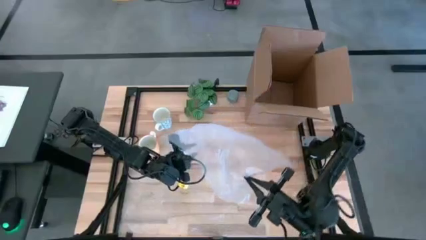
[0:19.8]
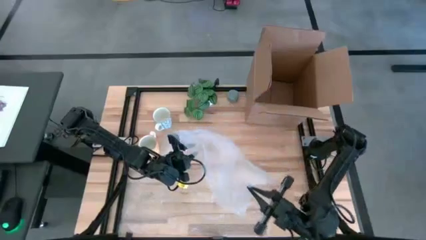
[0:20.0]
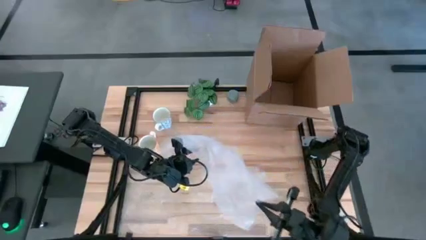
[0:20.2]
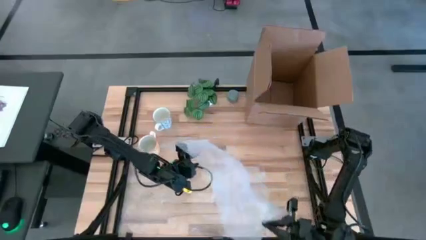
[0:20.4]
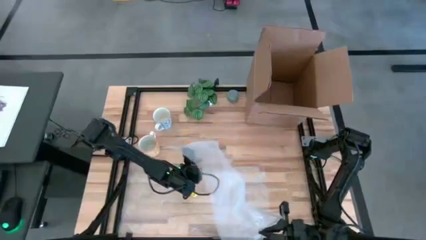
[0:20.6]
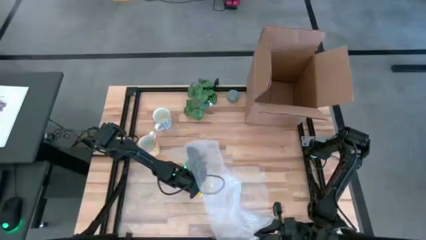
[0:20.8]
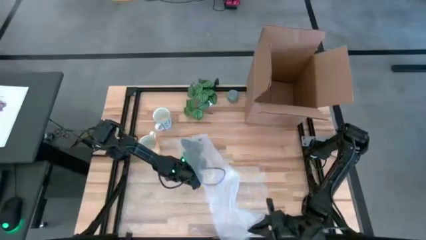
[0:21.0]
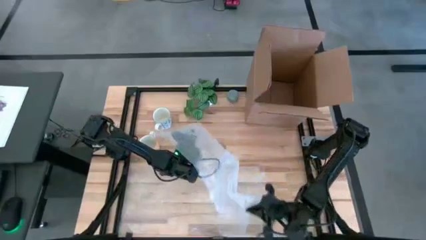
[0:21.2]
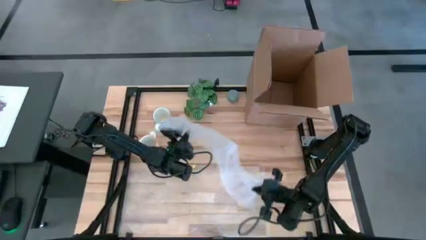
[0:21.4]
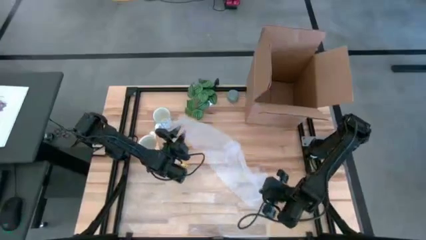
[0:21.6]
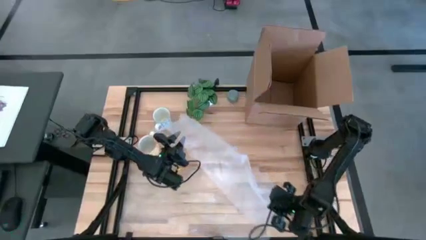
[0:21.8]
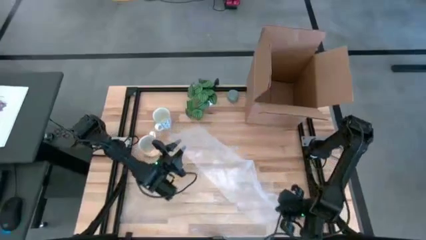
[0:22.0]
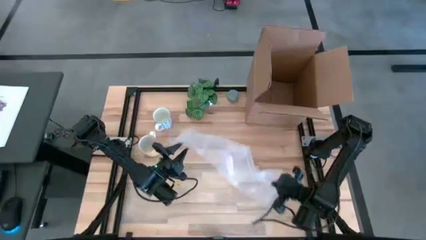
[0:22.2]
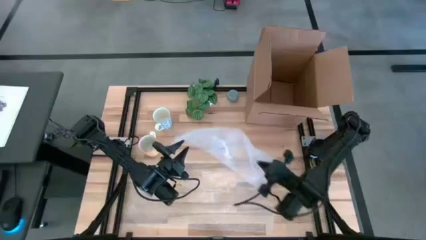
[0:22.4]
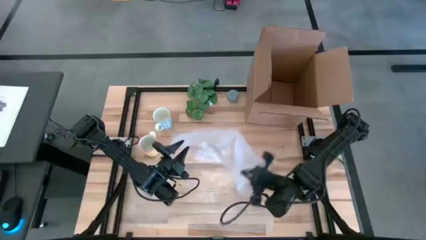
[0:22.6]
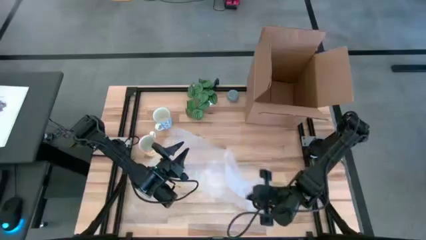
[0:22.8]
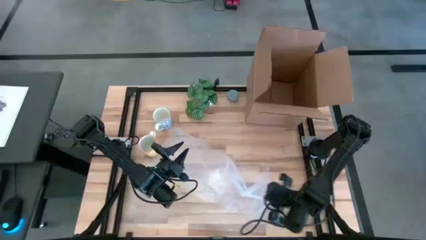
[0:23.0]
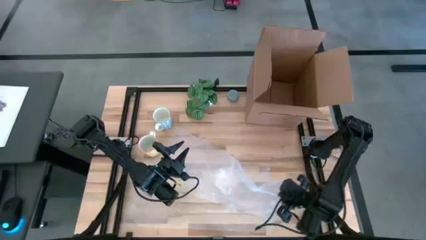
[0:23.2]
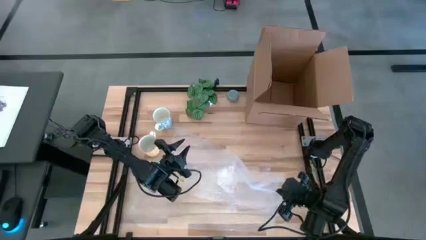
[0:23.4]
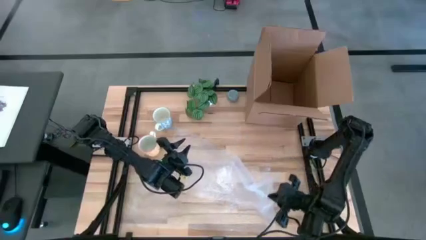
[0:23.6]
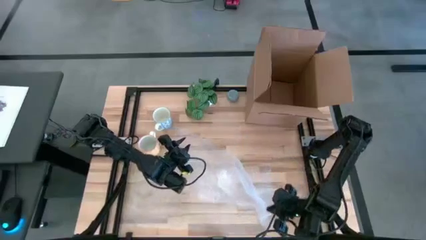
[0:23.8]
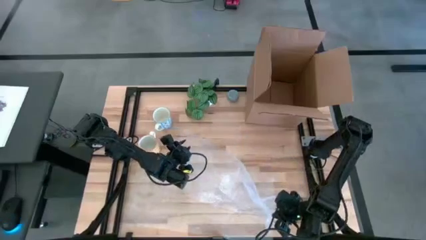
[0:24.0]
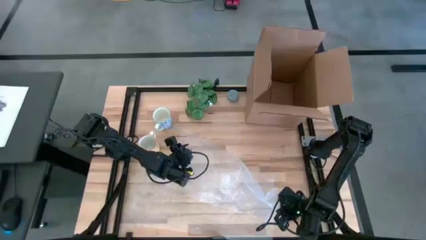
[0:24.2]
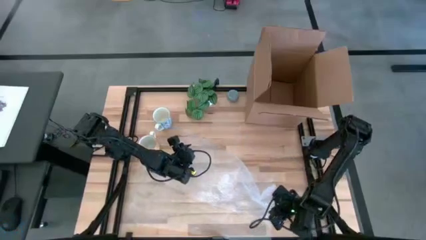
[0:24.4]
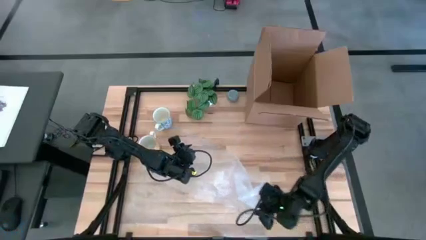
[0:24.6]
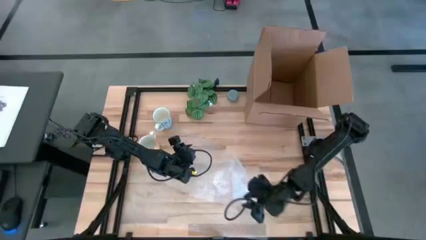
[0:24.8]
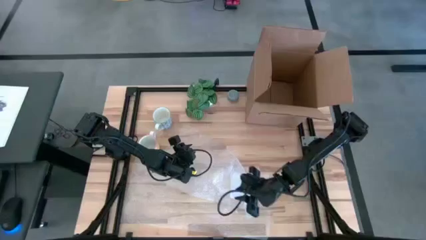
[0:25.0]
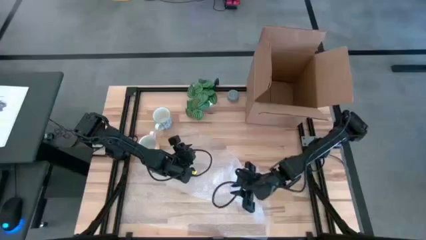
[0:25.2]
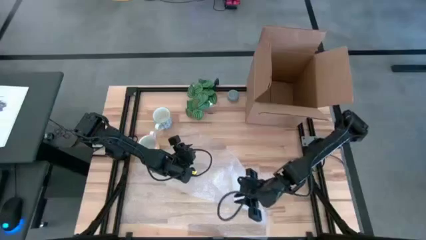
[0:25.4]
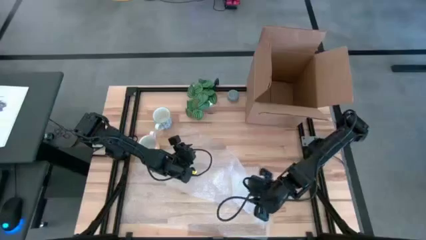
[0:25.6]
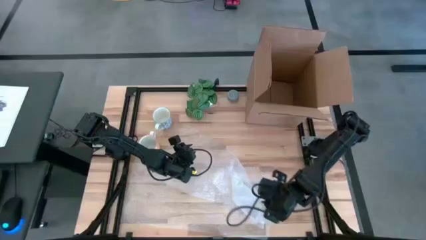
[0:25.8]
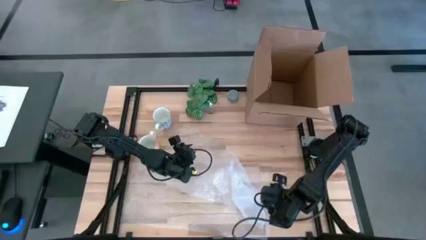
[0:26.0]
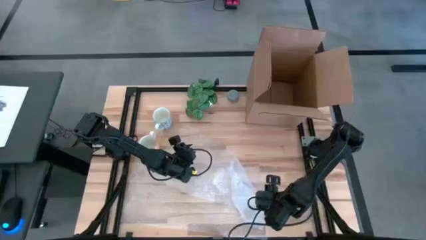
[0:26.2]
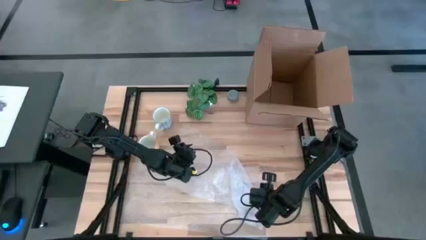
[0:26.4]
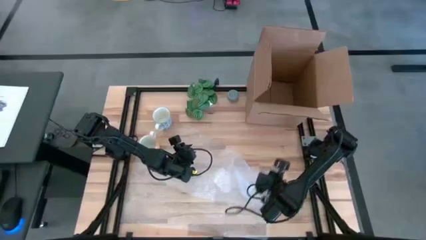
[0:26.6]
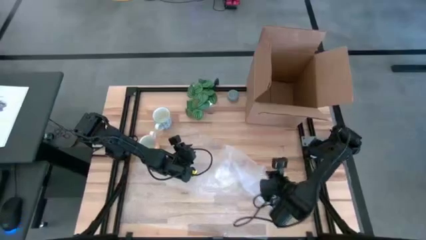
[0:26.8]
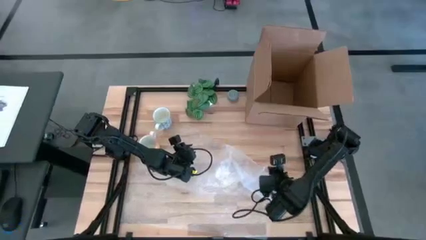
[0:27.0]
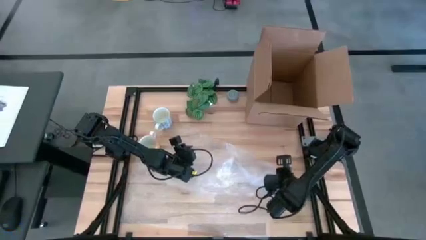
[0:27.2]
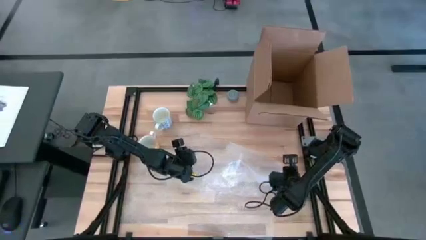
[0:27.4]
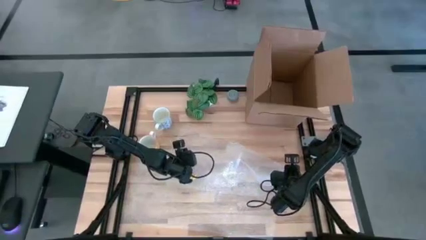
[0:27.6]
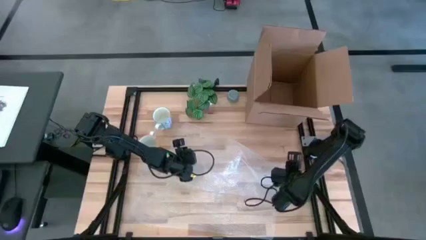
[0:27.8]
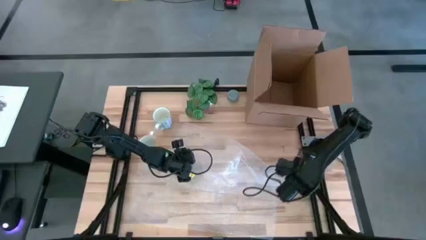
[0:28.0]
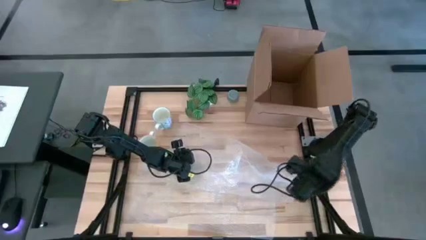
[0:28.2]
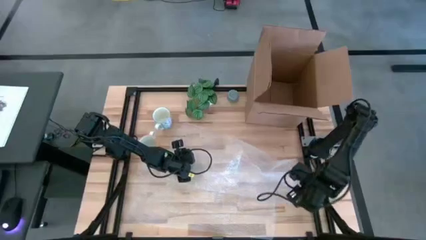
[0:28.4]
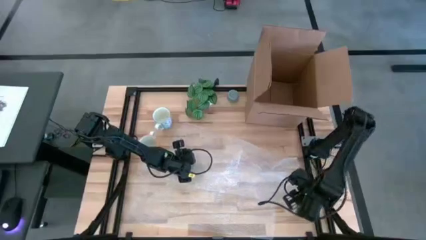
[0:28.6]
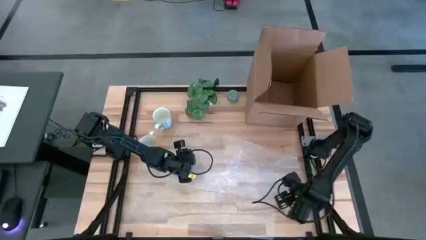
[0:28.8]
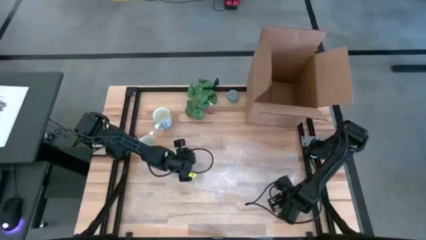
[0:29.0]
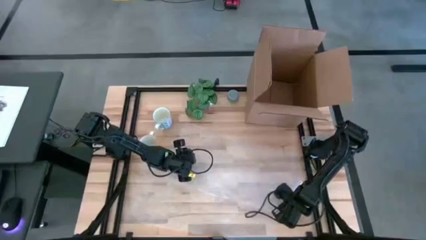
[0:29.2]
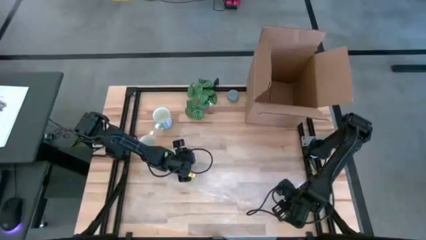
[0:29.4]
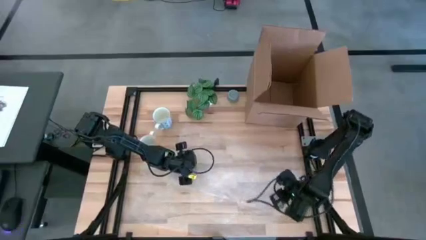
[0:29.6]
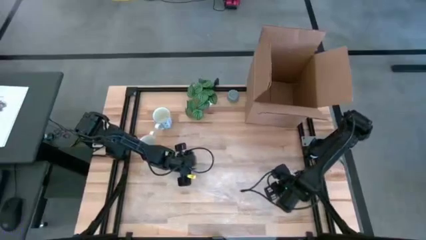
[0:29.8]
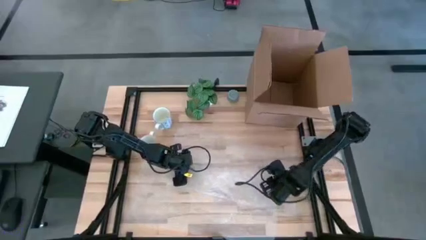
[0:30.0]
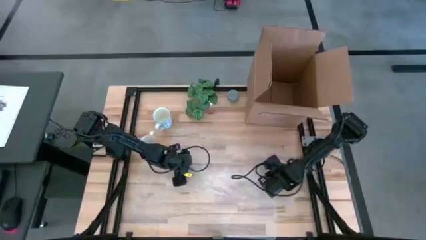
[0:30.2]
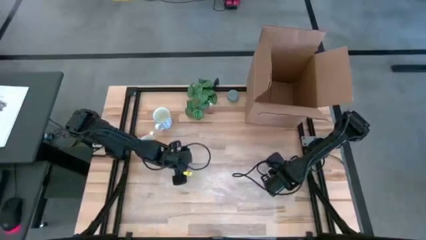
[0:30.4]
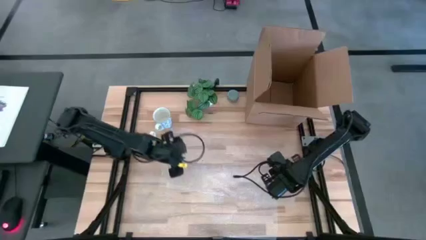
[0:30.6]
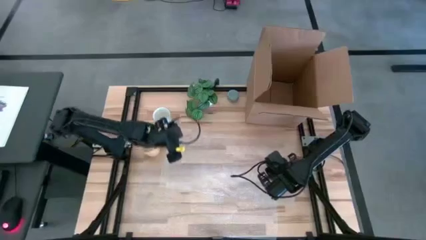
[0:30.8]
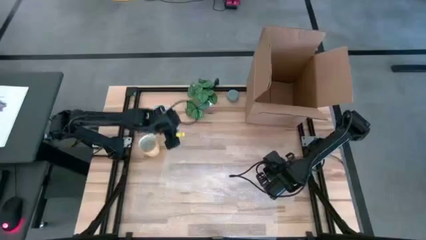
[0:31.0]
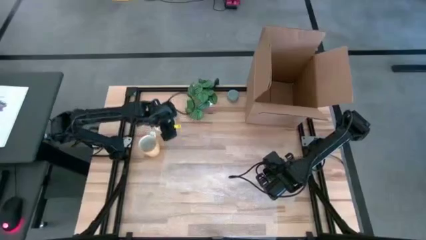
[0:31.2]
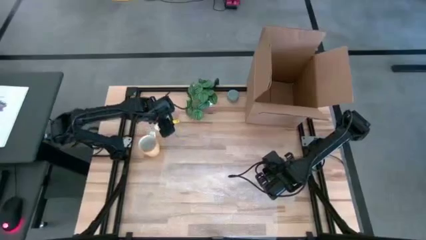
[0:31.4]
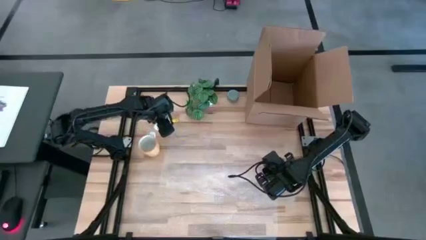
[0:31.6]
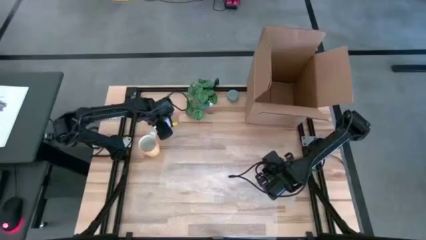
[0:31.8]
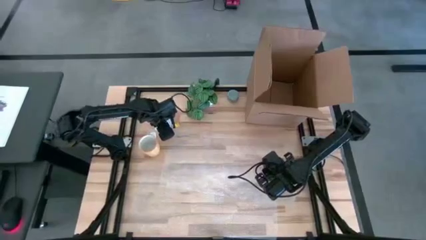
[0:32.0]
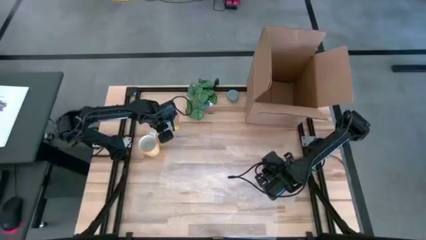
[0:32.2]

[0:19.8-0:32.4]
Task: wrap mug
Prepare the bubble wrap in the center of the table

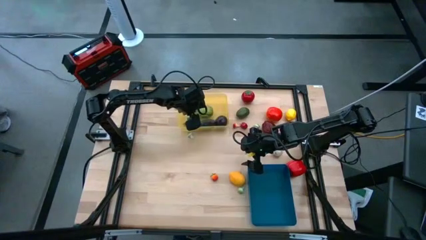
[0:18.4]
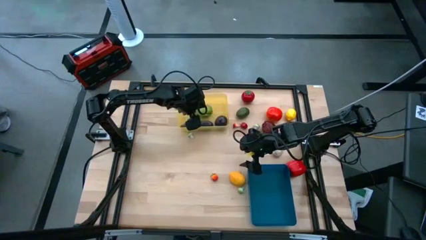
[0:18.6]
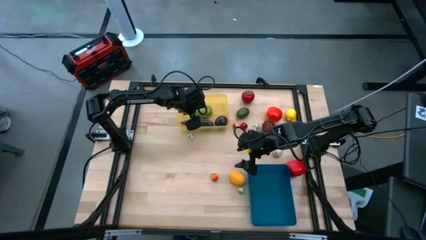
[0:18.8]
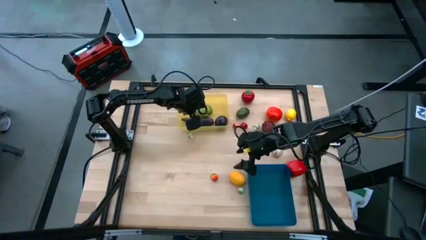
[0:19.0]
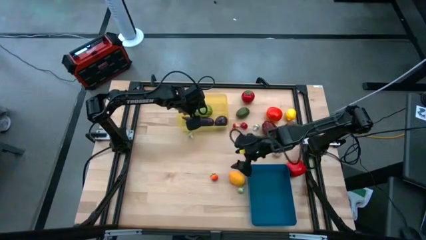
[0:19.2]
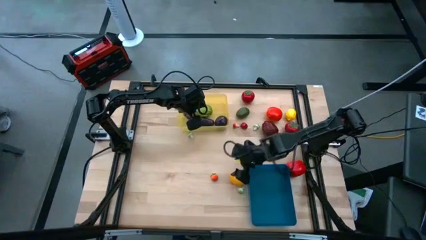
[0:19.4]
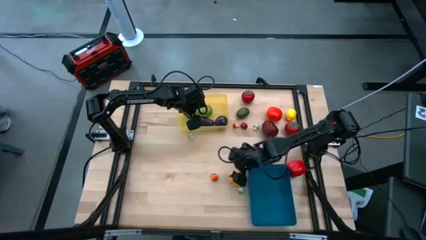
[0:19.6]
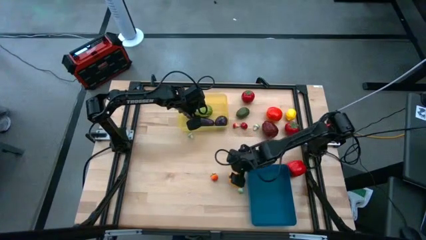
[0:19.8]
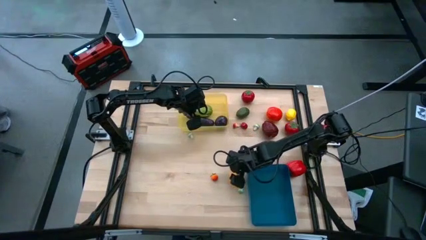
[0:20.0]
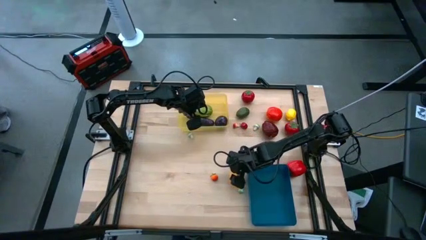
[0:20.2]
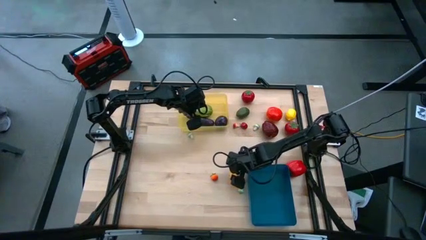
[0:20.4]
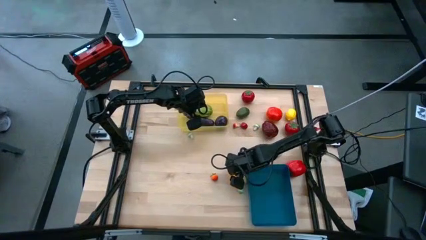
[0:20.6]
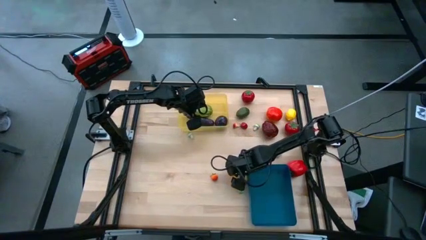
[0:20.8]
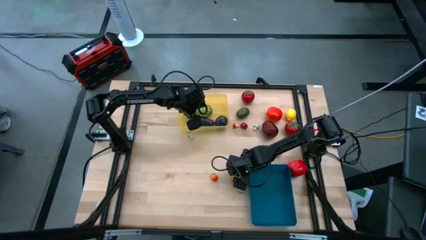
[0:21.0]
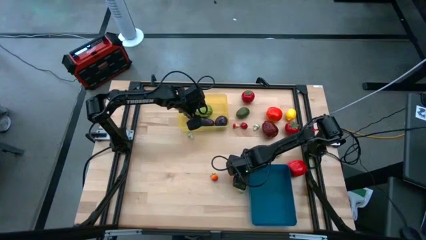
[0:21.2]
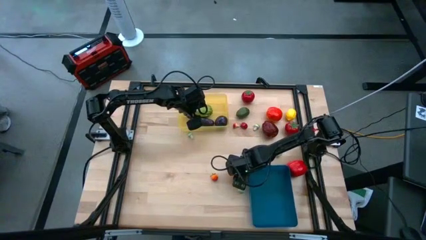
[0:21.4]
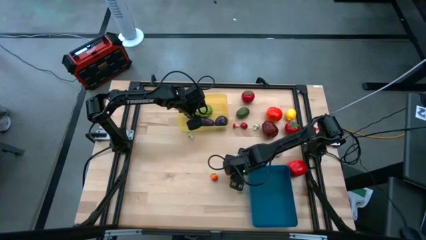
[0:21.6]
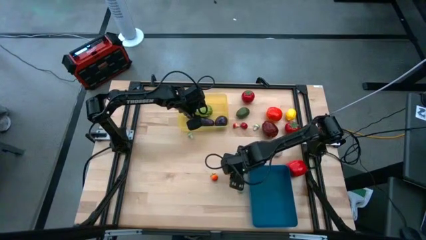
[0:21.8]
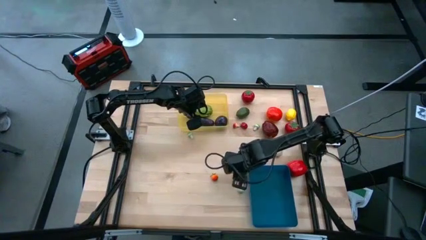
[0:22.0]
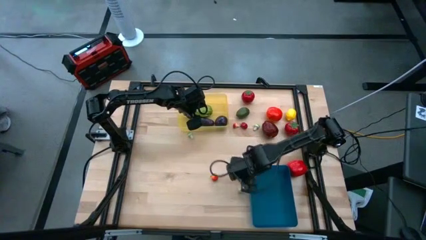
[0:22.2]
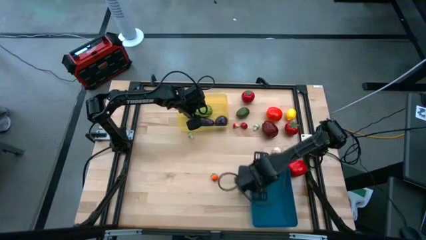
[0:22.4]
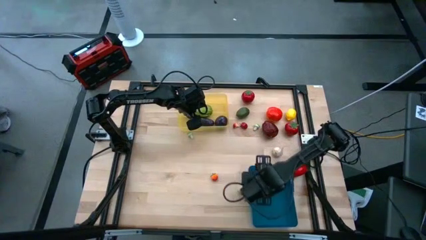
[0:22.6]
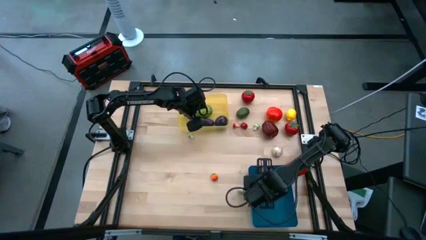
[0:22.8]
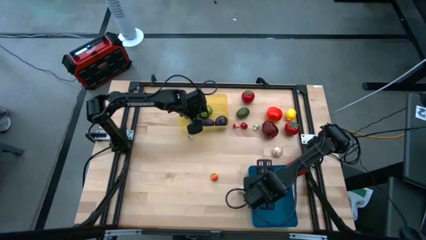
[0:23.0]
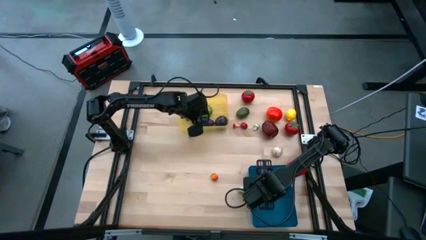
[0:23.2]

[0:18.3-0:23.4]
Task: Sort produce into baskets
Put the yellow lemon into the blue bin
